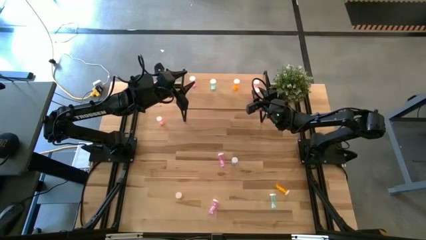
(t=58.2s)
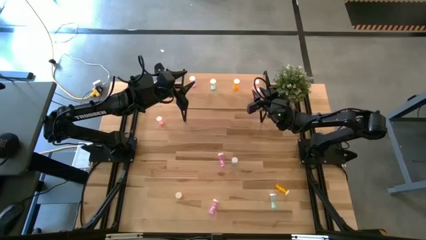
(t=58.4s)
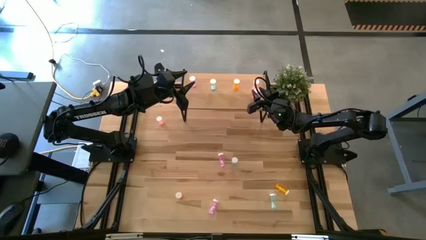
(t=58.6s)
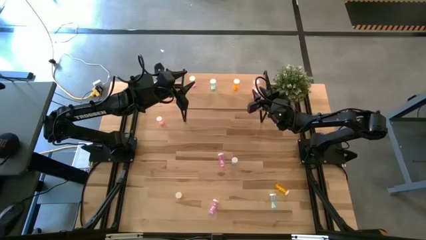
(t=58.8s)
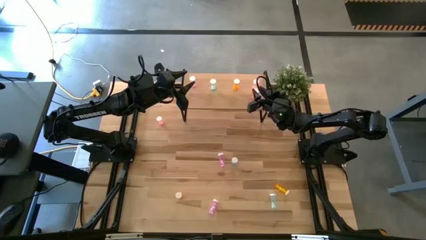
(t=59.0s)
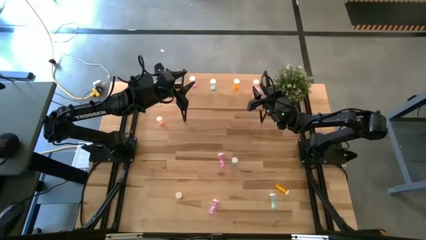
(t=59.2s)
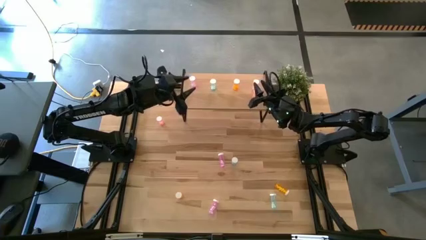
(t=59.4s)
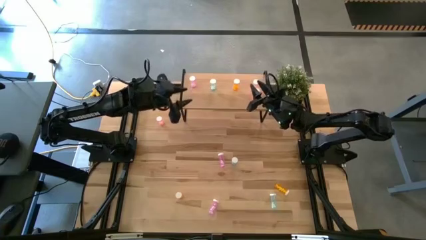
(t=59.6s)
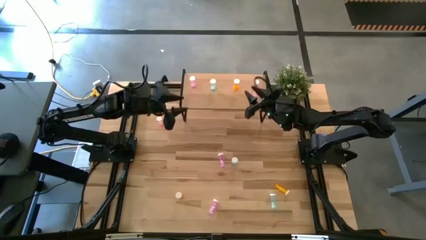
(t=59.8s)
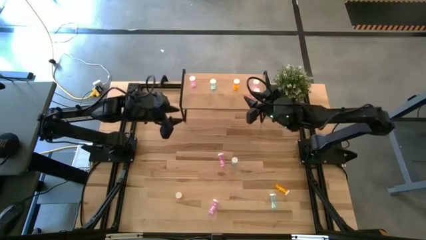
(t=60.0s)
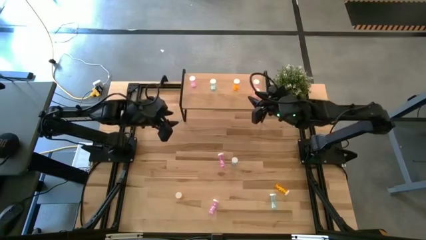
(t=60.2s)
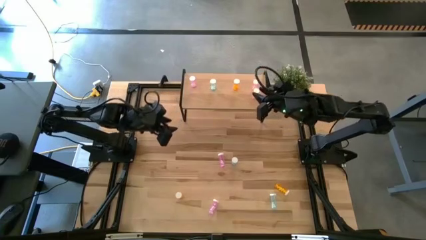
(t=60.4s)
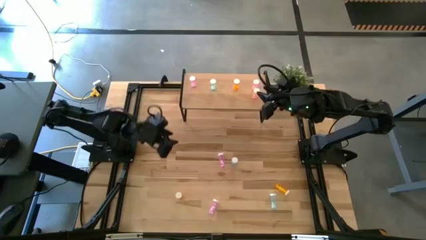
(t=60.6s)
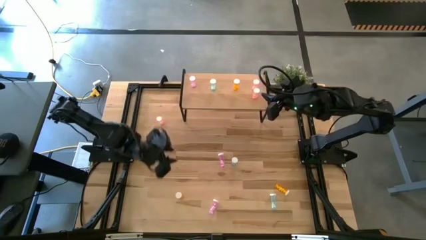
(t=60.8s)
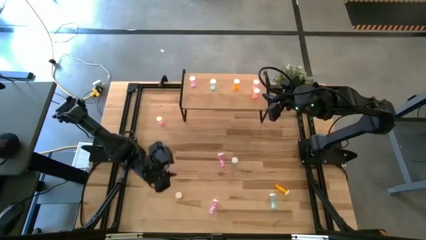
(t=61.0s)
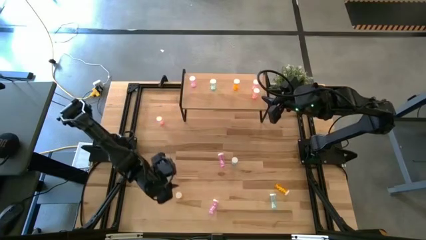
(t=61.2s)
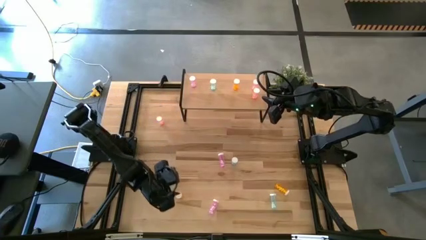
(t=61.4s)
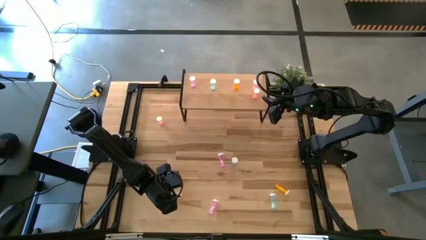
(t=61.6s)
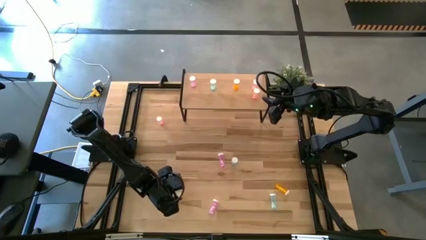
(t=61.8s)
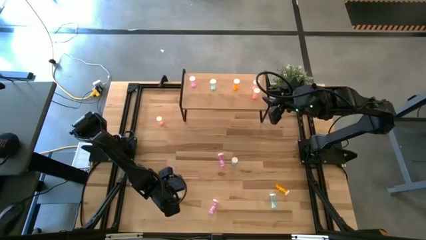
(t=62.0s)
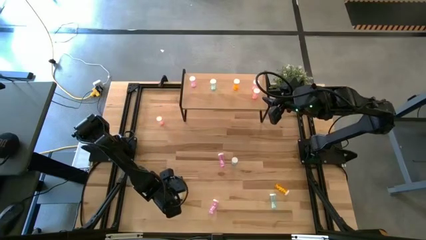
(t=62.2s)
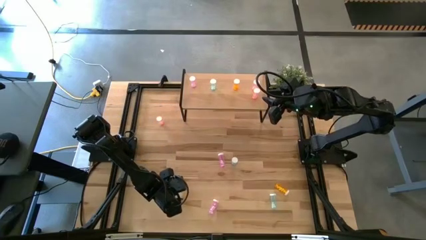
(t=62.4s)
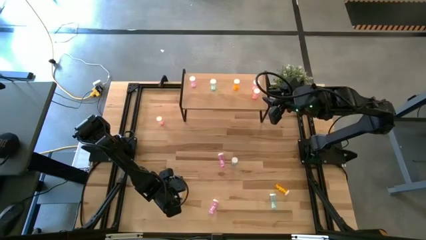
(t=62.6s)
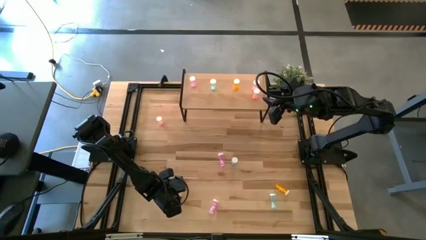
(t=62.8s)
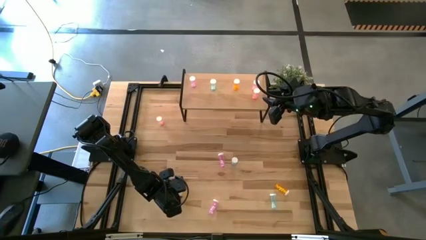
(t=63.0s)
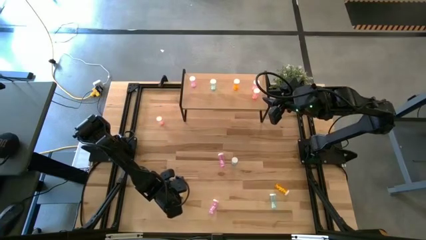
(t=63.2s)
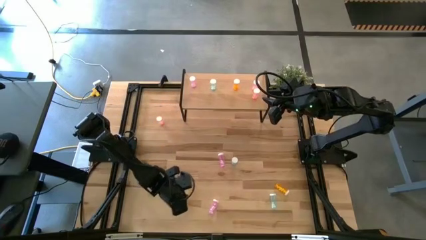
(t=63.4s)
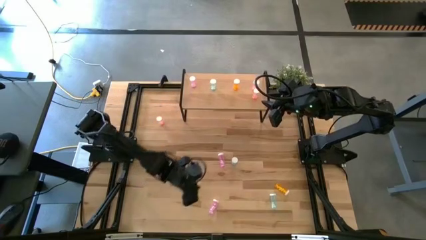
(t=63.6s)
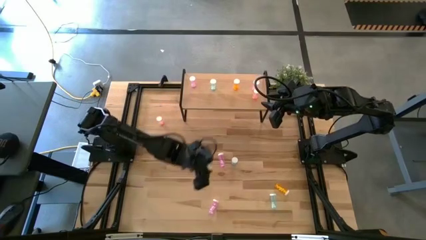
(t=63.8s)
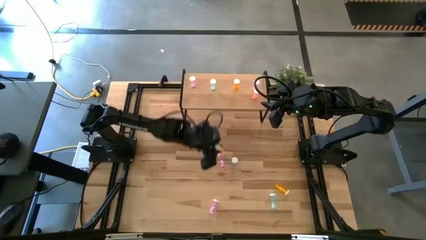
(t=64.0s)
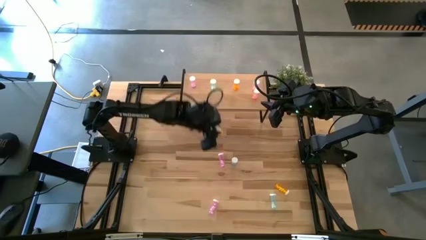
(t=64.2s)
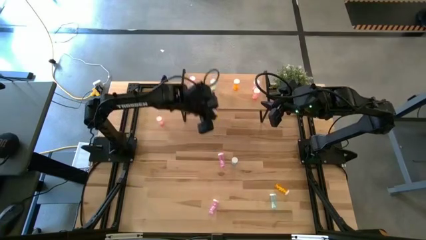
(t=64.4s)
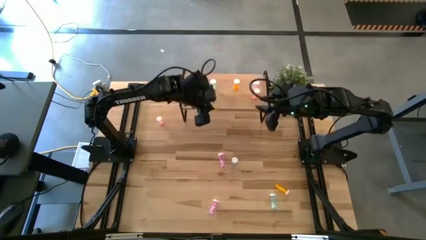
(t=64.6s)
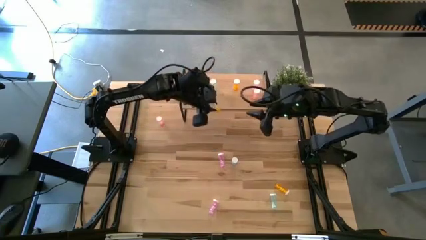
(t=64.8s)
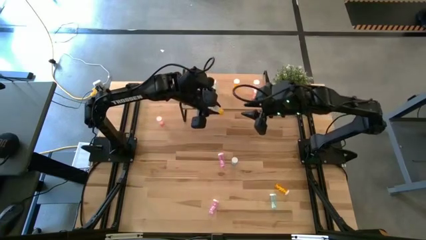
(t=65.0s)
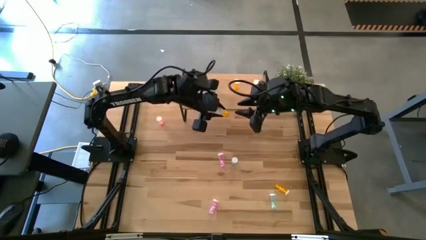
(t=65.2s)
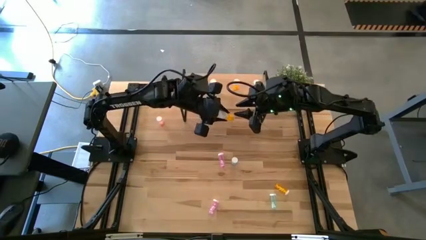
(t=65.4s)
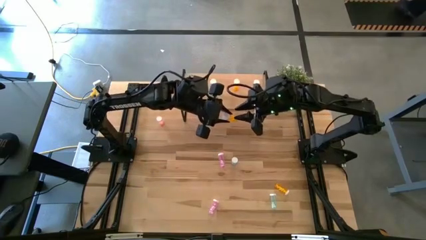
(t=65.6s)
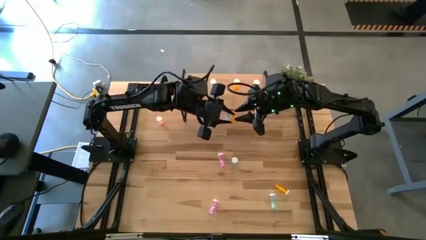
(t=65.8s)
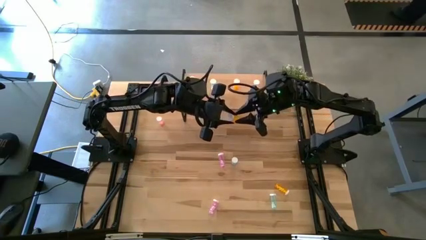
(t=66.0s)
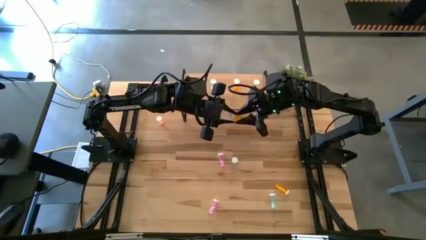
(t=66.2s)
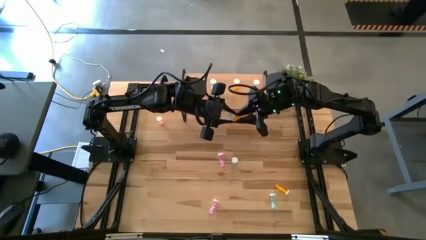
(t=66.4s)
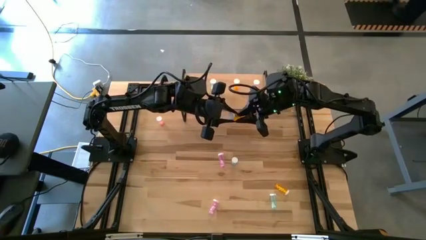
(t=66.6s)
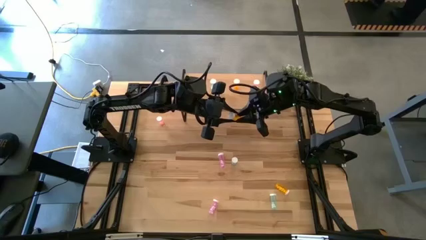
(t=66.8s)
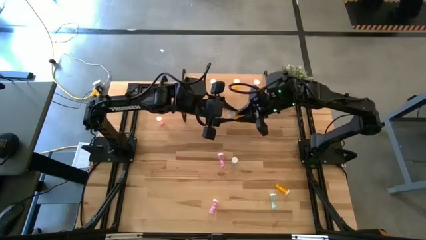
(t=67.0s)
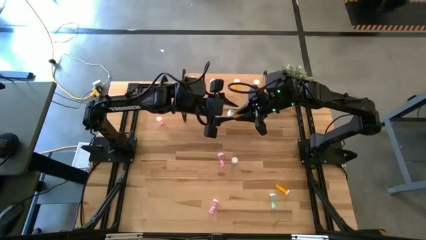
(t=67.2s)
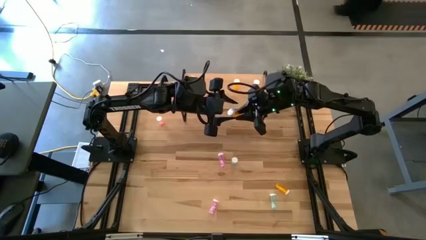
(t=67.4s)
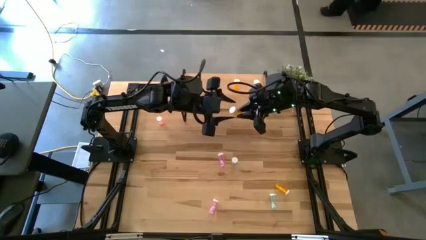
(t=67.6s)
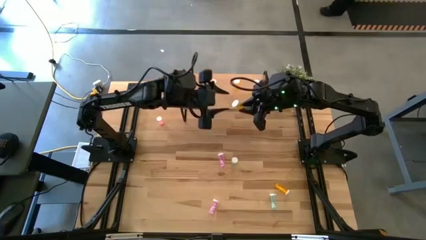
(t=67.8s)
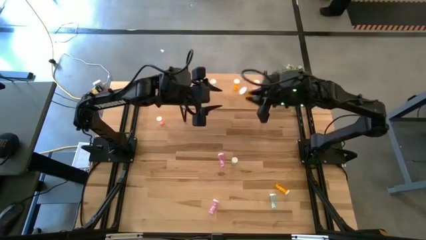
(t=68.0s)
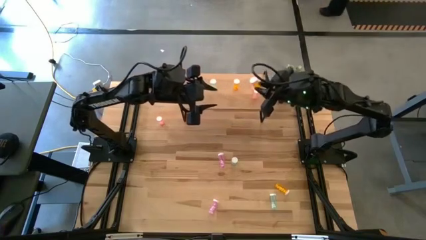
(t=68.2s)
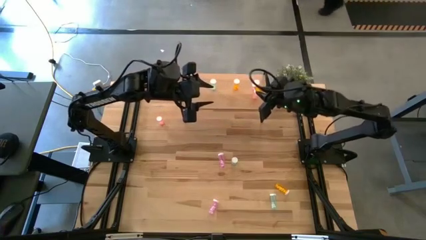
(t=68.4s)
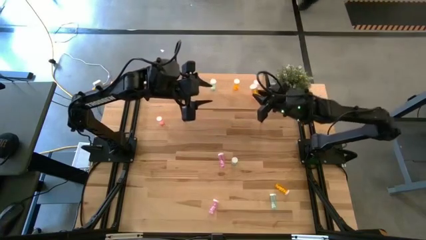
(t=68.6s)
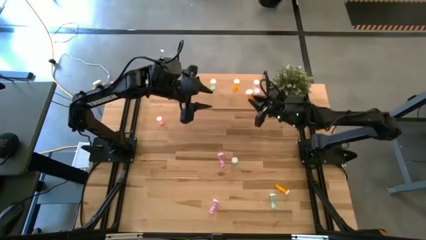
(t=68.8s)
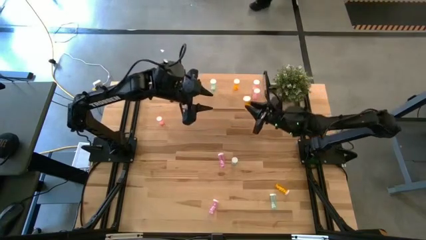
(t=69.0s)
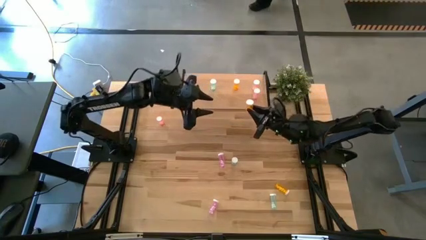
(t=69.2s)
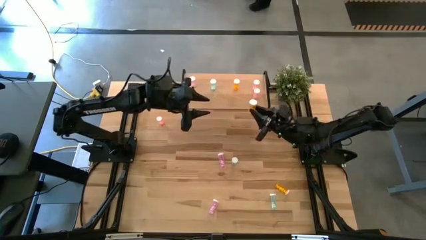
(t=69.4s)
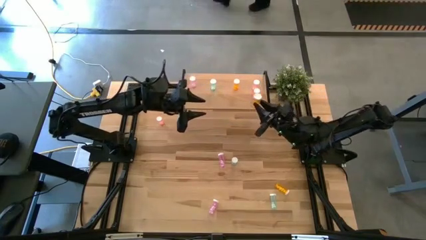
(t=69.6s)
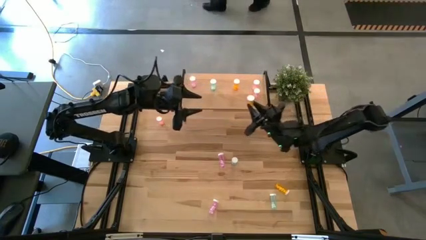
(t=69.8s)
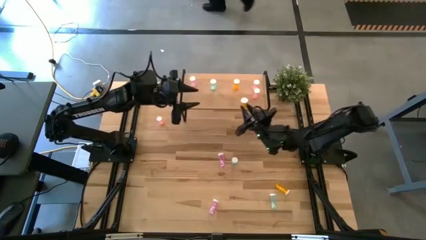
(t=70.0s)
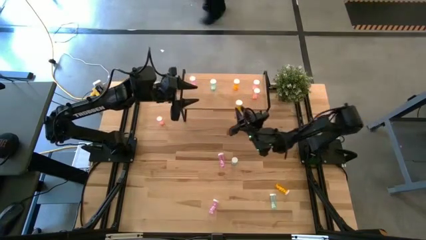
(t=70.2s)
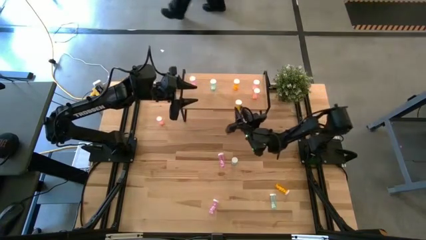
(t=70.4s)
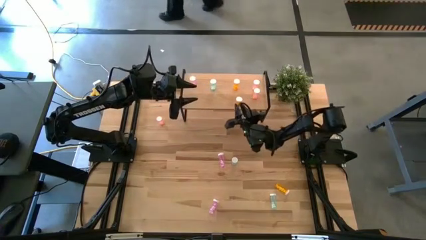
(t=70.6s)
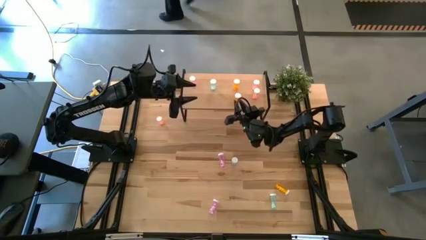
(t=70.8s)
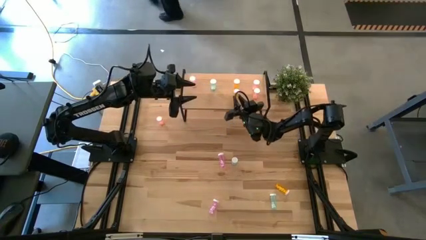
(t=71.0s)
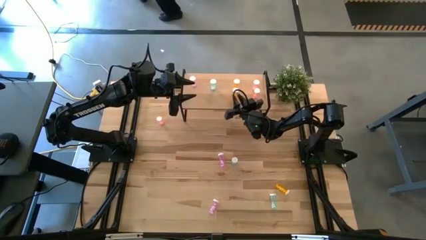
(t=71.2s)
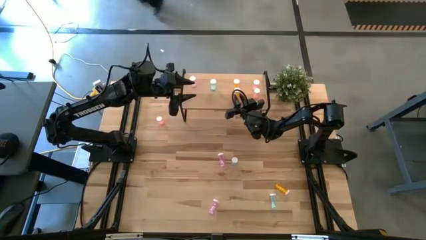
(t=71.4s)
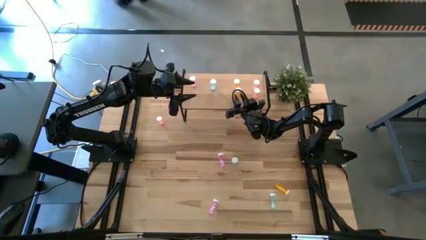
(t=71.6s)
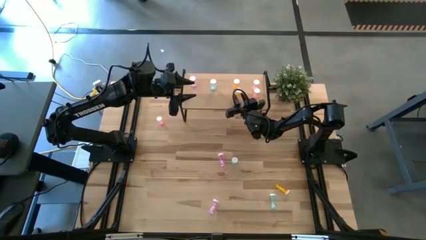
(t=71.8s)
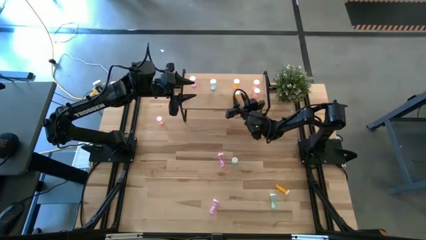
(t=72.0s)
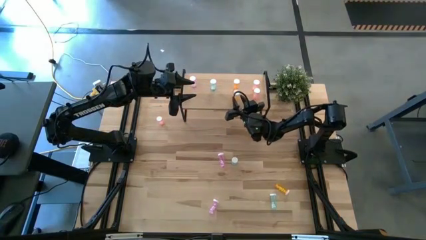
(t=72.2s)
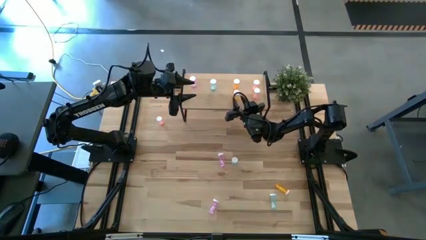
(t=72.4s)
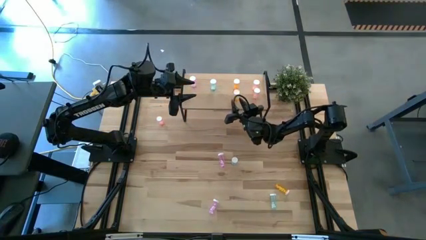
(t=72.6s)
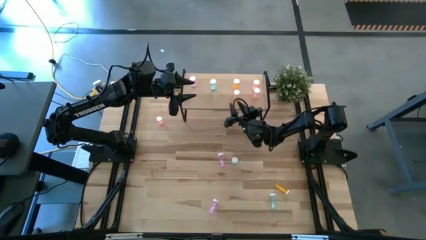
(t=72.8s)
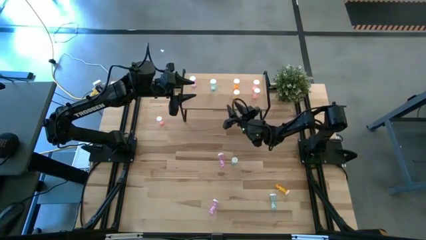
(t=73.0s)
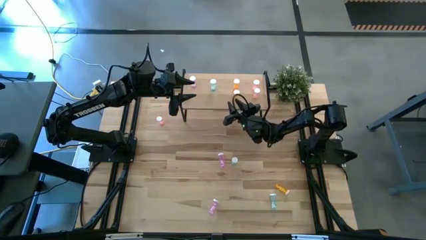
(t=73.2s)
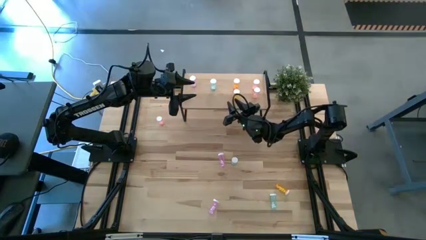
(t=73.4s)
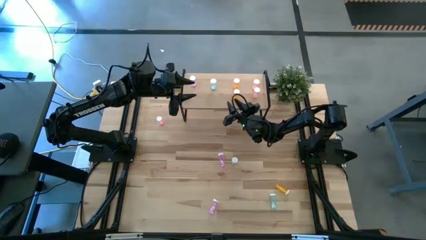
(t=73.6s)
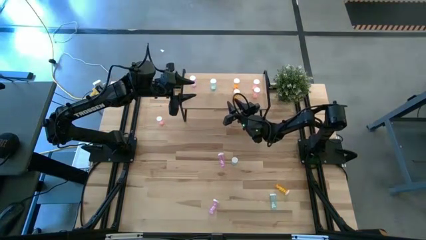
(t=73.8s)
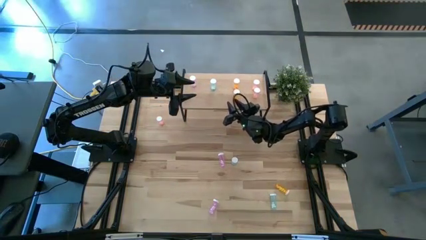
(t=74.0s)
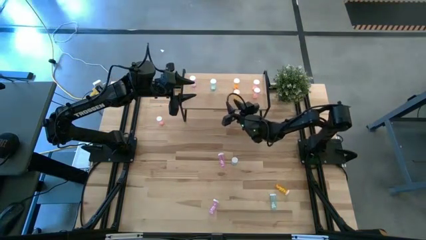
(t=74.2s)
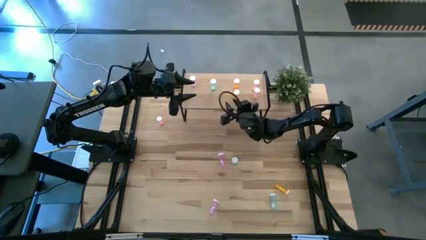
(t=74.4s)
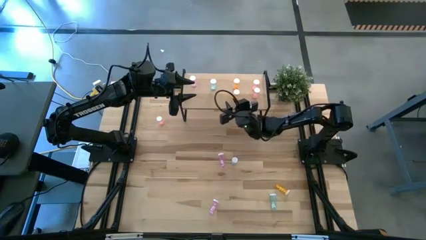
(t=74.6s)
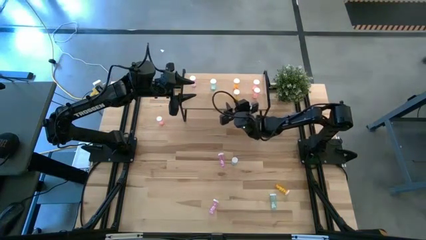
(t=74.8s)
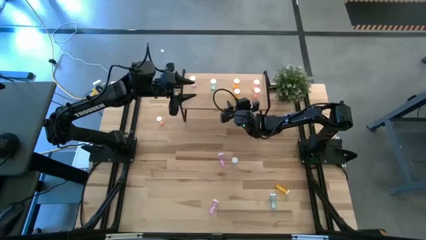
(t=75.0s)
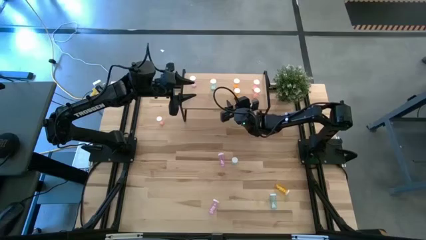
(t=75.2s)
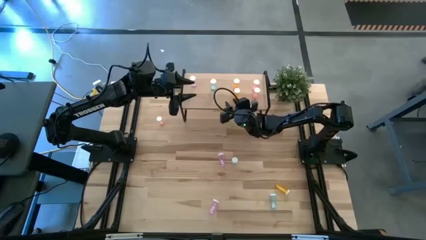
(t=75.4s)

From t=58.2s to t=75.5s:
Task: Pick and place medicine bottles onto shelf by color
Put the left orange pill bottle on the shelf aligned with the other orange pill bottle
